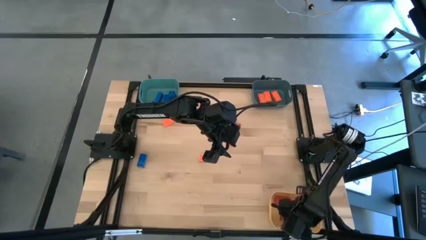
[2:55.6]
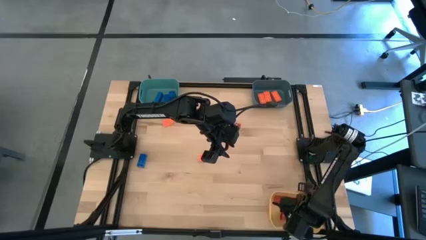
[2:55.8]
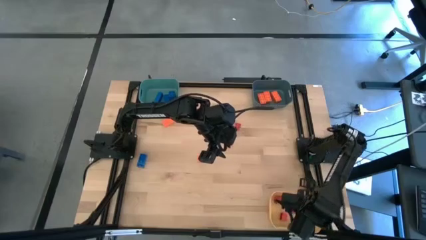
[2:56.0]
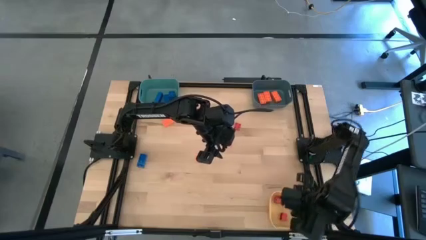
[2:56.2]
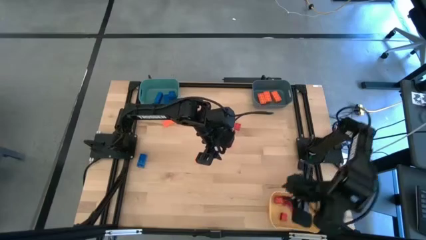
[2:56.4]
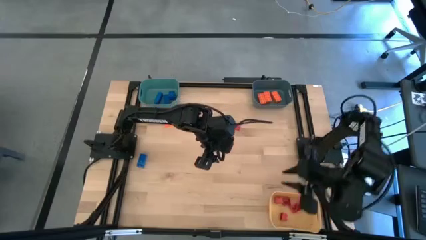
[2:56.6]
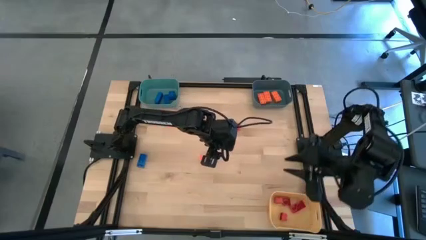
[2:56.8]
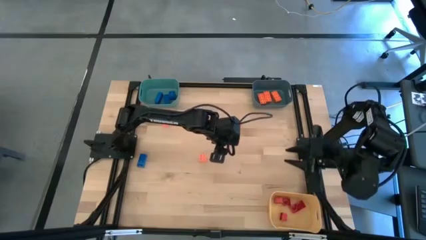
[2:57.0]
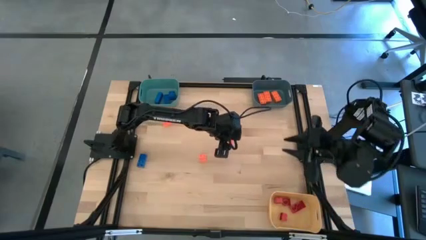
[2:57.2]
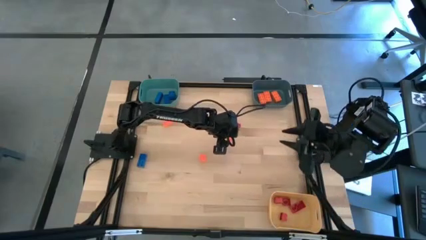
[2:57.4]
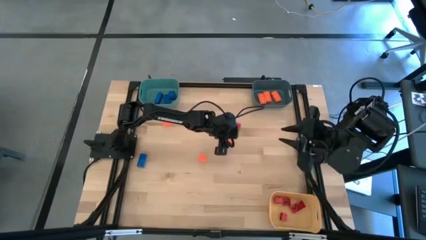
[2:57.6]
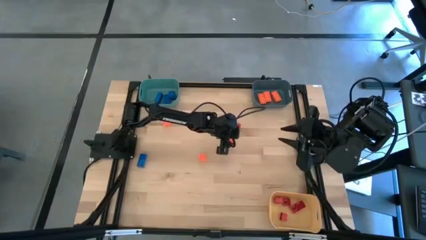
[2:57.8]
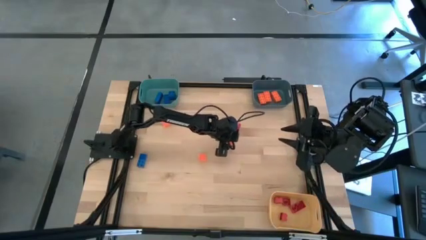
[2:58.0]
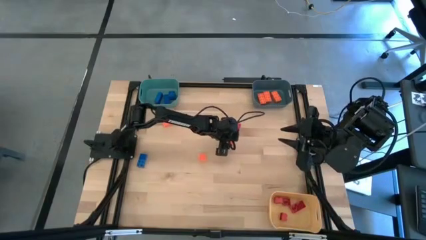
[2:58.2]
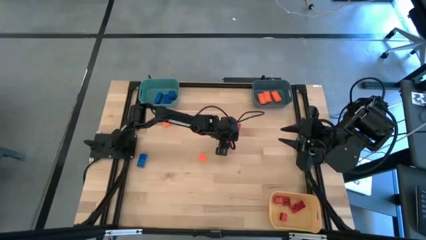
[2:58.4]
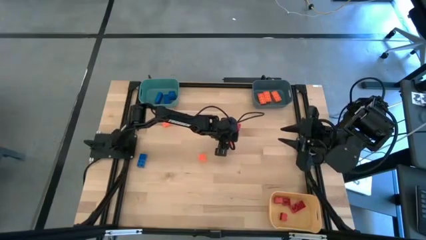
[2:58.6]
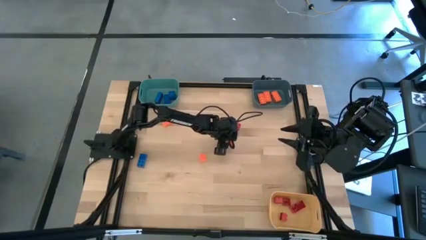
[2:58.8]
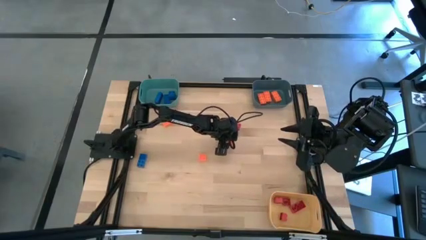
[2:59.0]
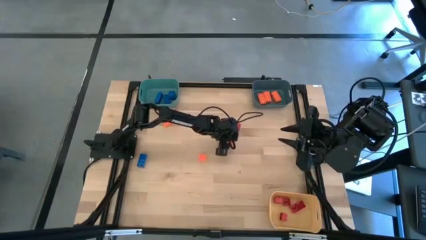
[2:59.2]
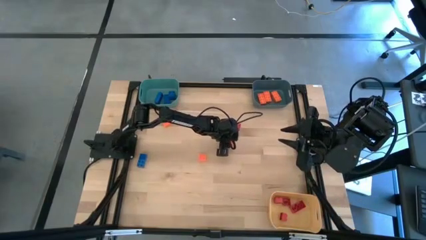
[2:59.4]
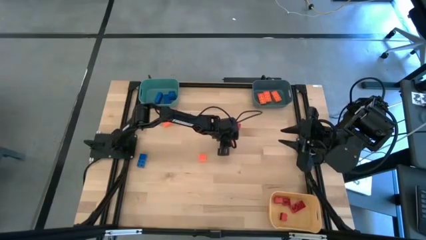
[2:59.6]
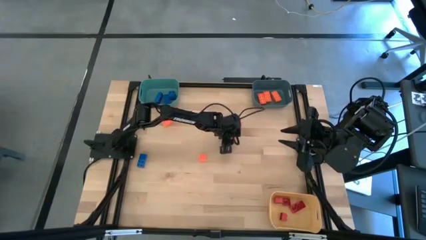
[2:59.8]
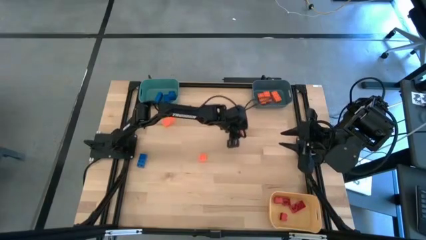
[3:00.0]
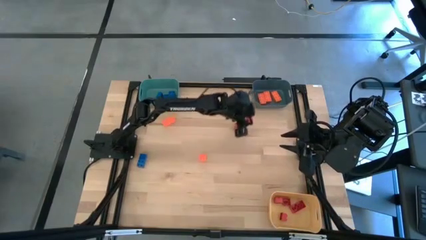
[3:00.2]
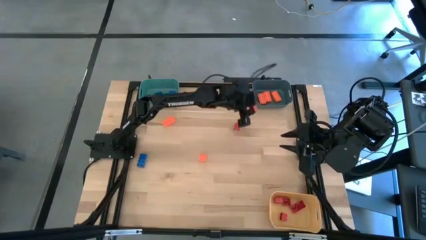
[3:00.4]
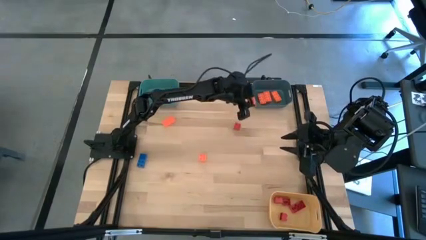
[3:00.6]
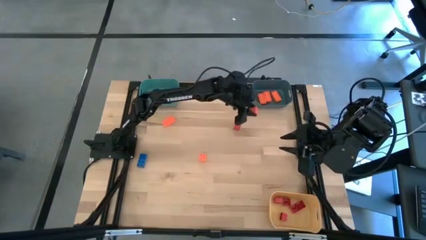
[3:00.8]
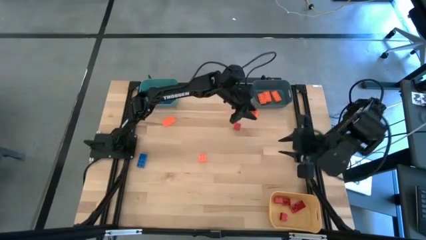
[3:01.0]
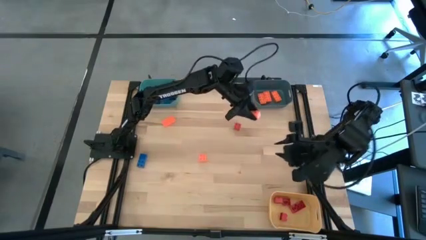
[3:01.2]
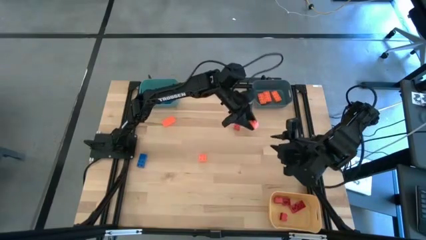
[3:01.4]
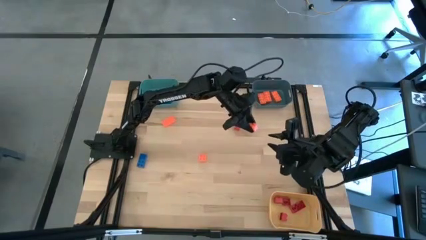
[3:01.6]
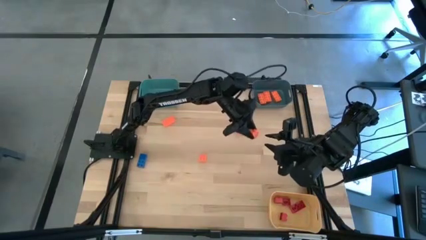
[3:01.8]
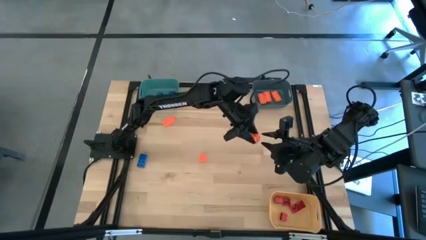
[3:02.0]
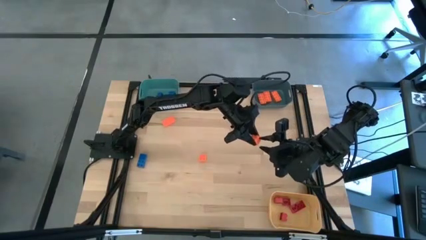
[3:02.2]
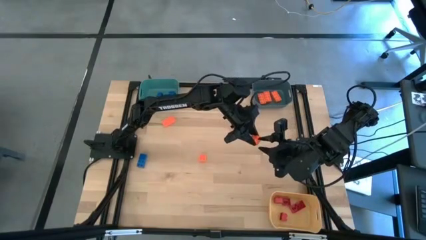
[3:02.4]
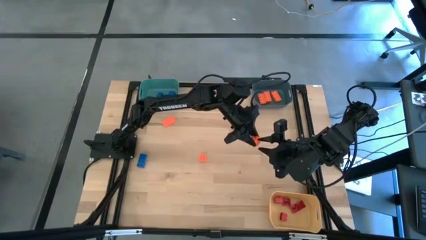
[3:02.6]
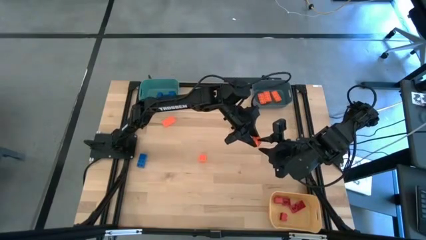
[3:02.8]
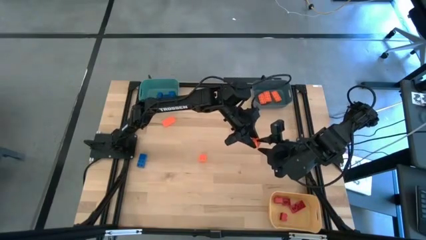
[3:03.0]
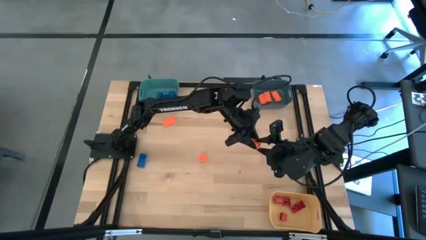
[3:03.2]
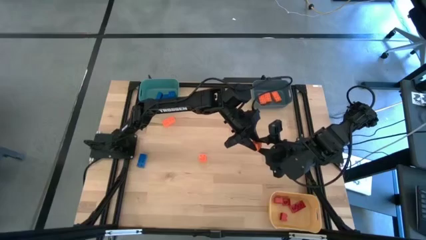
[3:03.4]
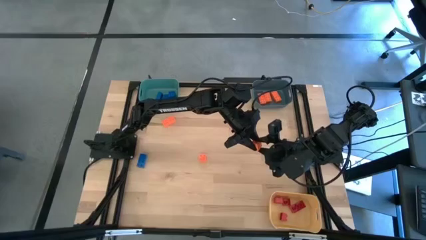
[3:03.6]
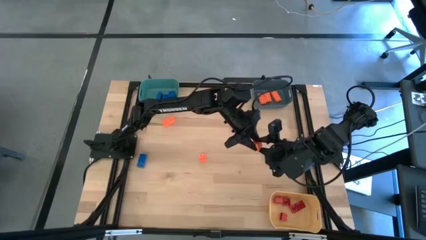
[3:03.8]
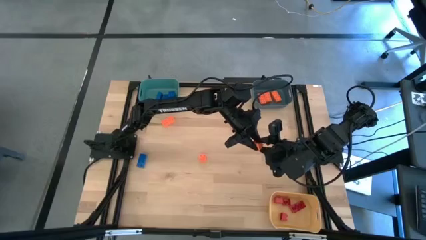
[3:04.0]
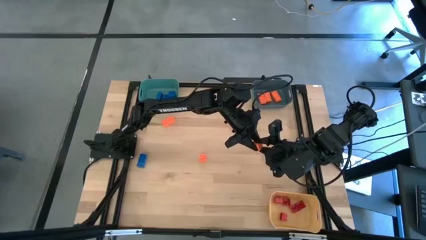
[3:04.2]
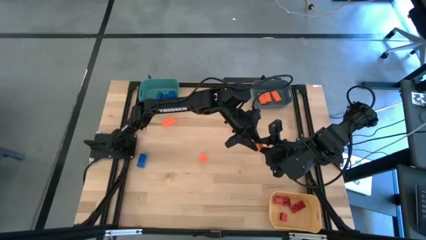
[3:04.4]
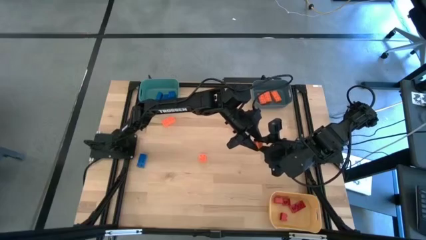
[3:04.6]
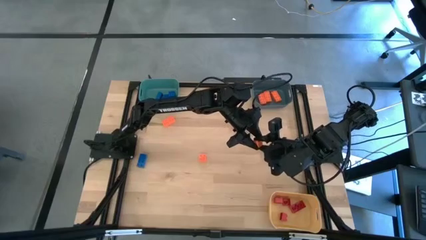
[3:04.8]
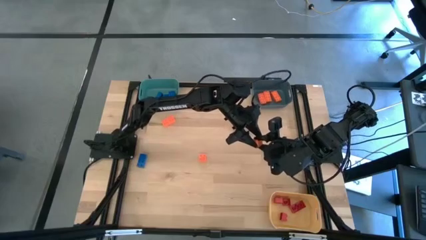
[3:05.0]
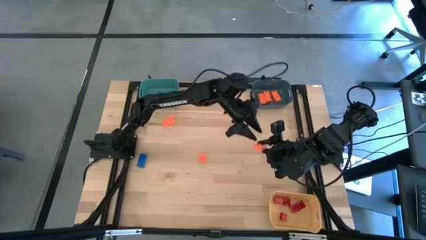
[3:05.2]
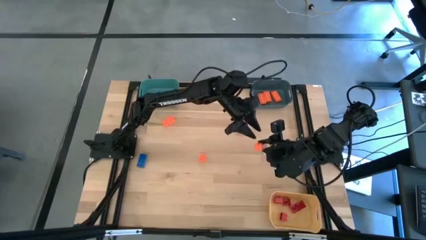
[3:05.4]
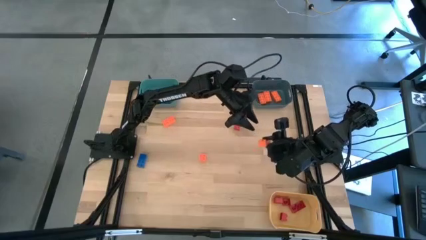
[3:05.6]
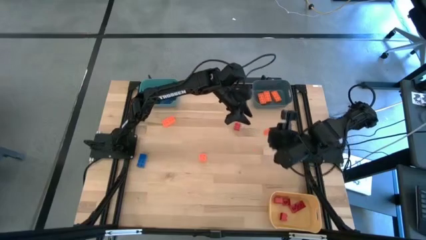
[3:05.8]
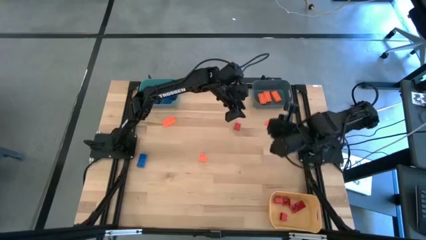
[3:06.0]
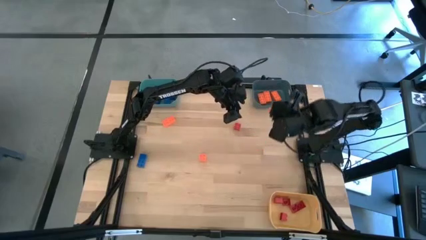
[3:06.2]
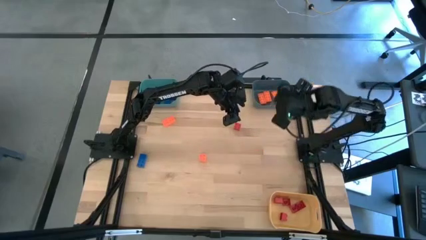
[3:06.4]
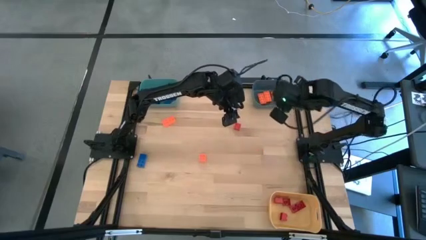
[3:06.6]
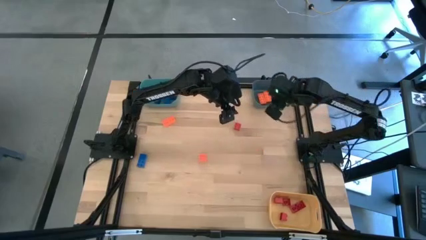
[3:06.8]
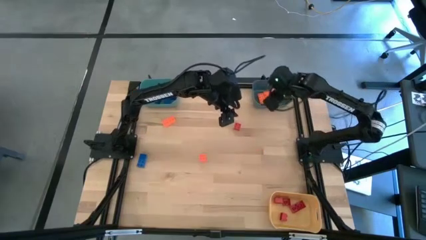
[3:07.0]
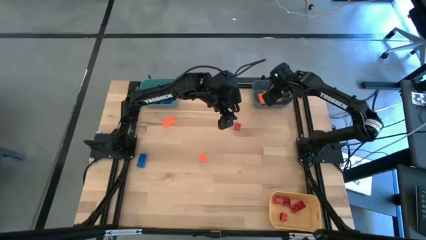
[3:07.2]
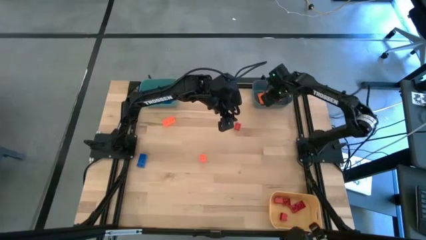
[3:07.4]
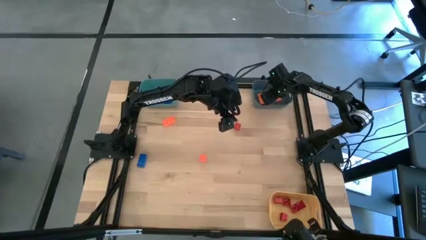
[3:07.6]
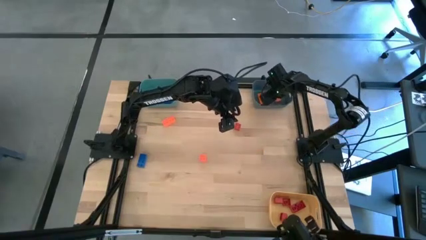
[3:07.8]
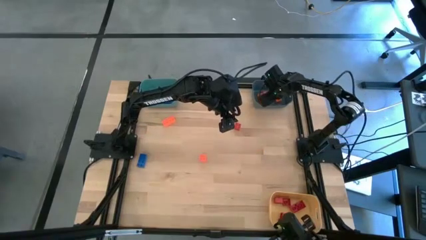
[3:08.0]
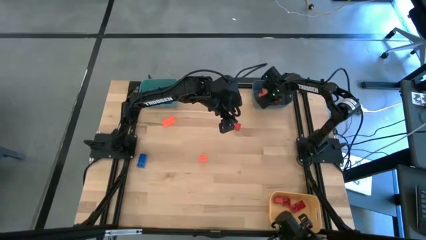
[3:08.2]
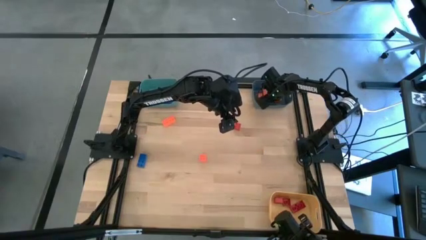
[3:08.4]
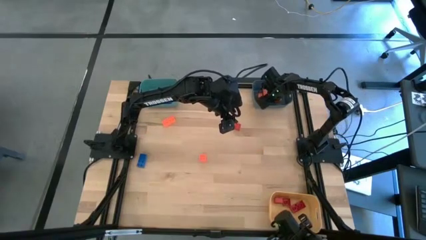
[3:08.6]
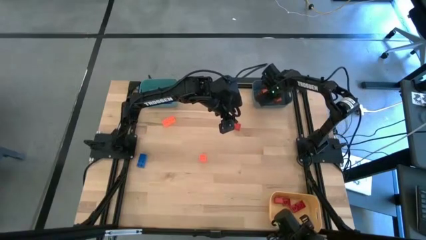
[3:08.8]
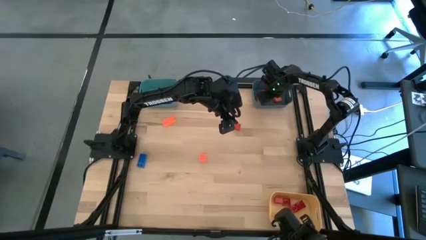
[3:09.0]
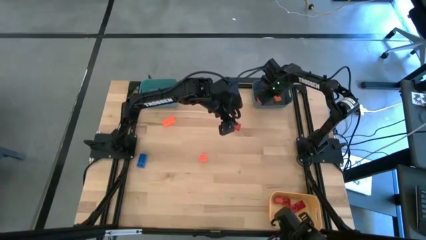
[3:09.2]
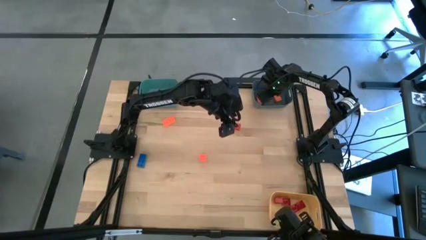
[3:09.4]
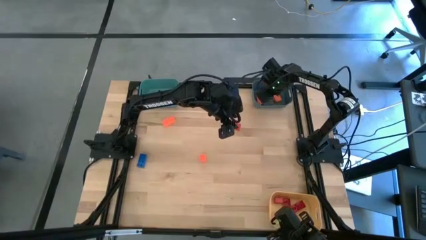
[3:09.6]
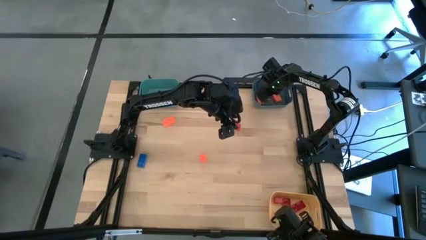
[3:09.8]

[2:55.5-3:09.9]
Task: Sort & place blocks by color
Put the orange game piece into the blue bin
